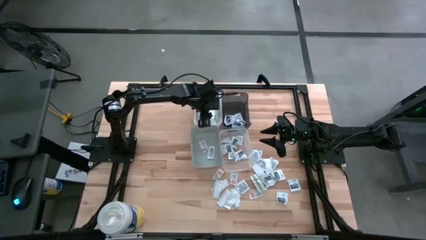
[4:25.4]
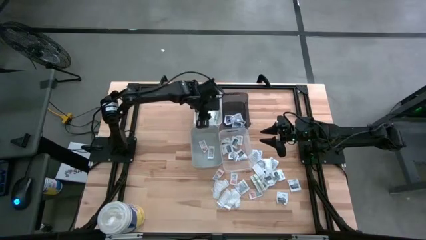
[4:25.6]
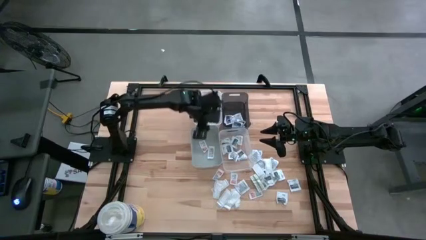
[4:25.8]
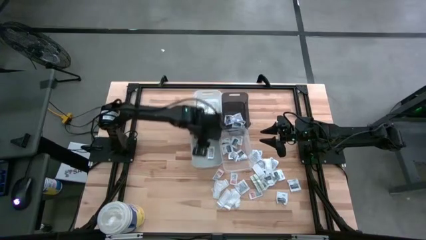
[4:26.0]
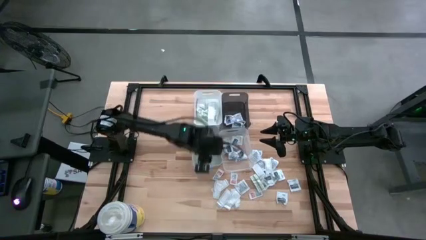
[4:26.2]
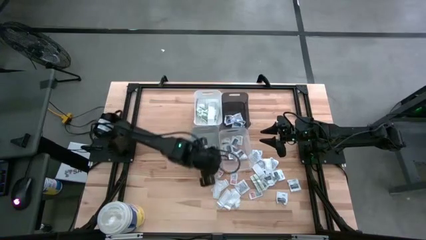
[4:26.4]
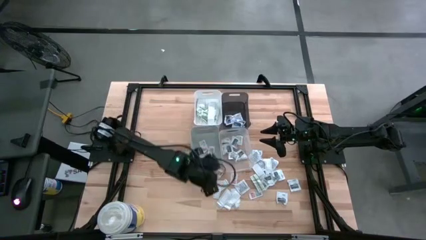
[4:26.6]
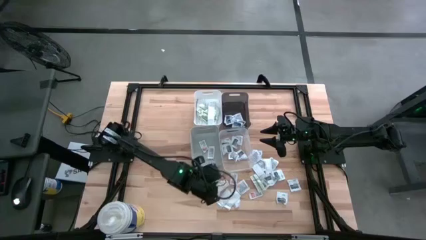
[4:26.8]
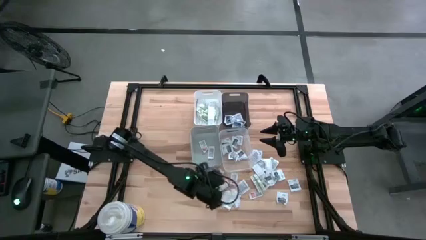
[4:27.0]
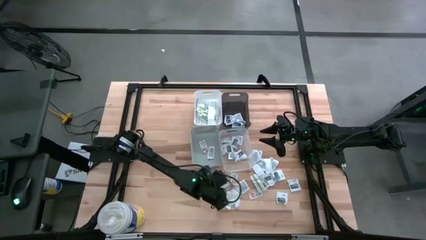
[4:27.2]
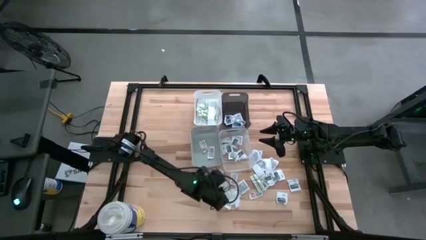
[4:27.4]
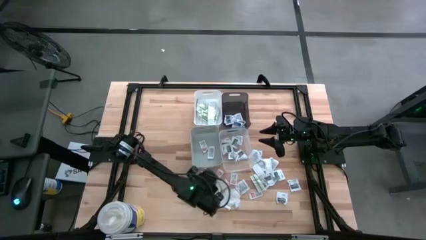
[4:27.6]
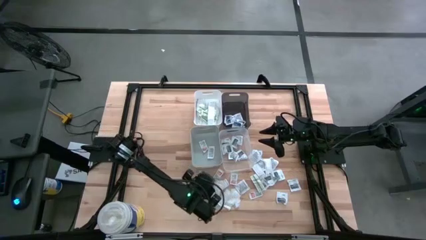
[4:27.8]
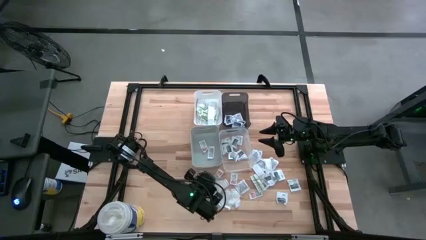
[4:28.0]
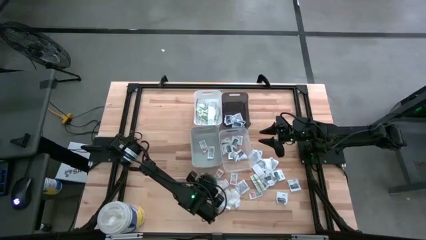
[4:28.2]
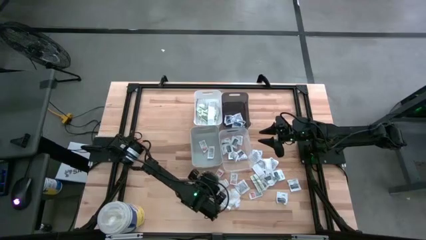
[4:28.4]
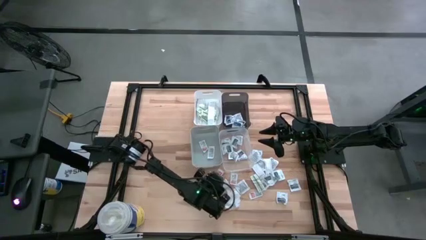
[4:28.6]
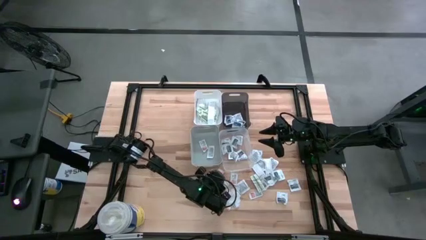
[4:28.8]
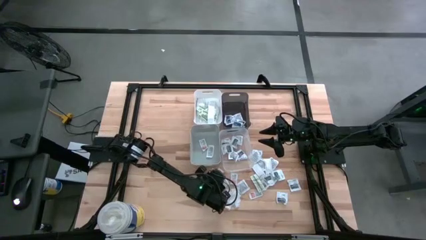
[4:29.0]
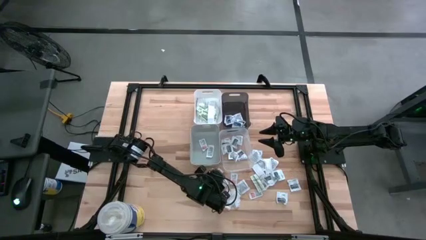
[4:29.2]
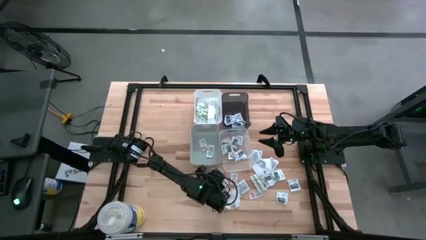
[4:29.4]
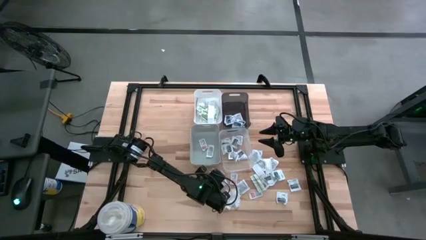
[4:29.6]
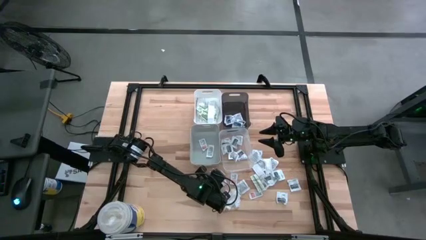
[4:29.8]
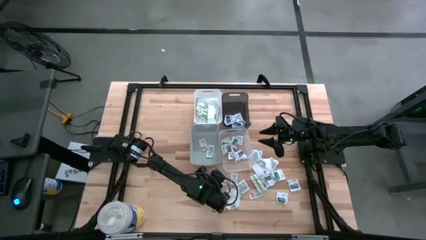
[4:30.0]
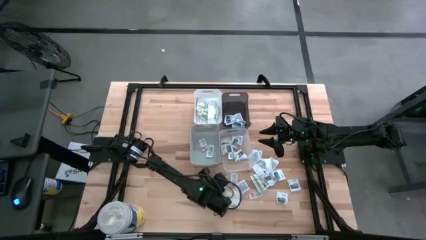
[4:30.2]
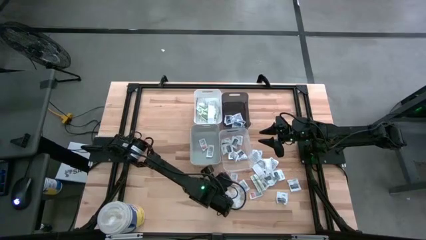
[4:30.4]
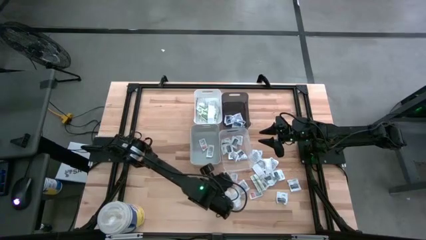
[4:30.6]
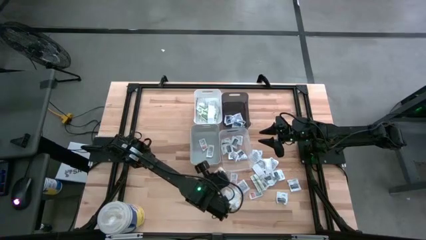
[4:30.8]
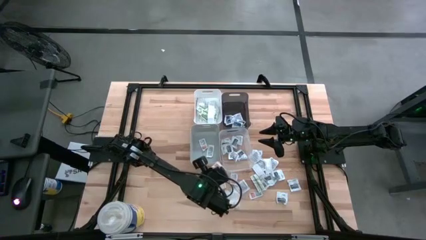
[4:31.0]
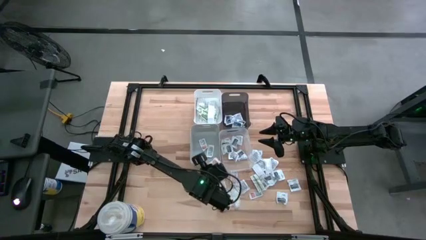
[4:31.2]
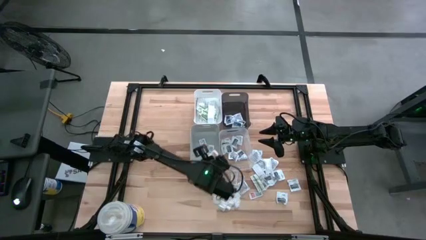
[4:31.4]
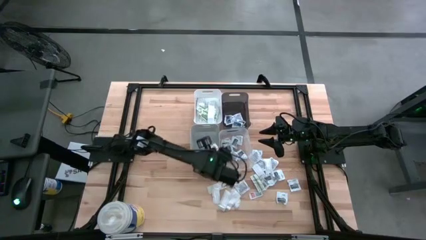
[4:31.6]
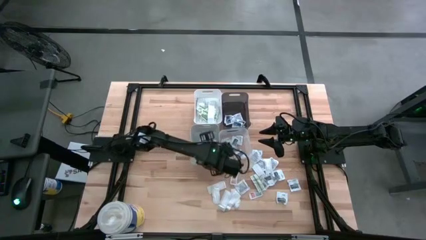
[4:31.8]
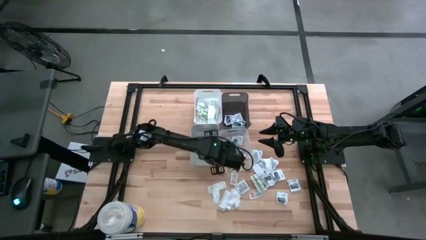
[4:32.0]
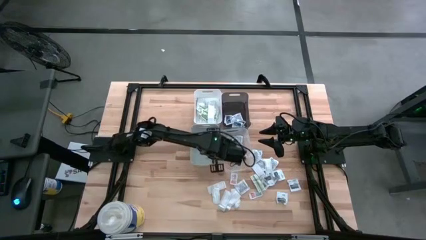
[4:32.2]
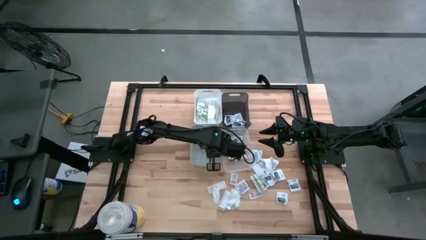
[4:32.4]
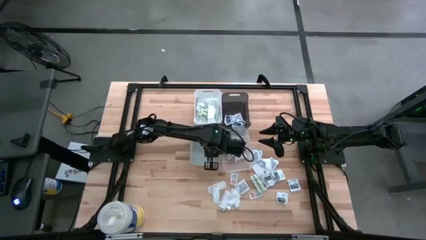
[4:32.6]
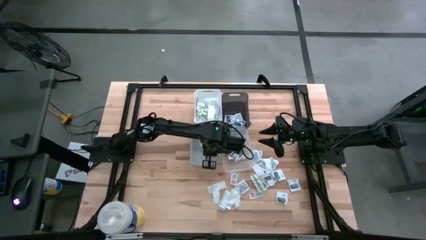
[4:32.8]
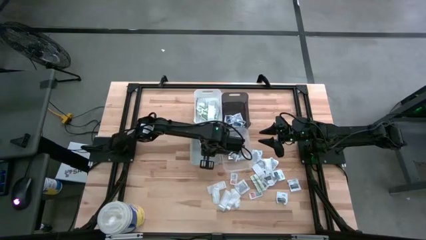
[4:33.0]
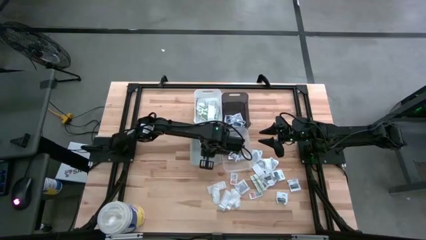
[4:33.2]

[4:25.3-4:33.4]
Task: Pick & Place First Aid Supplies
Put the orange ointment pack into the gray bin

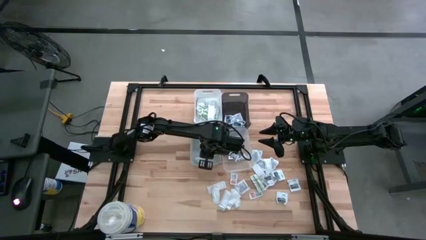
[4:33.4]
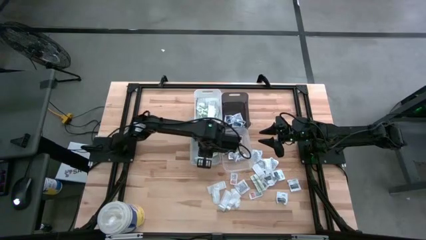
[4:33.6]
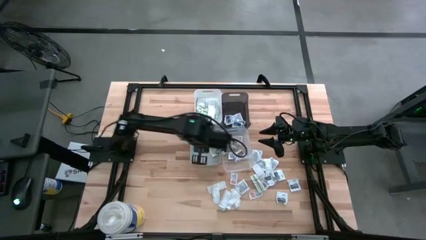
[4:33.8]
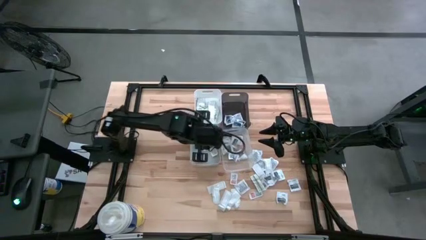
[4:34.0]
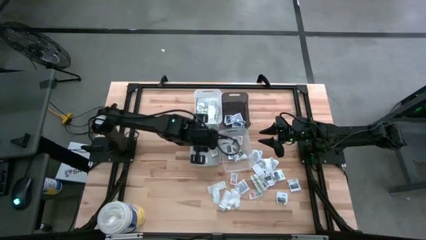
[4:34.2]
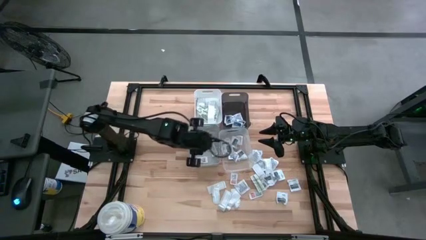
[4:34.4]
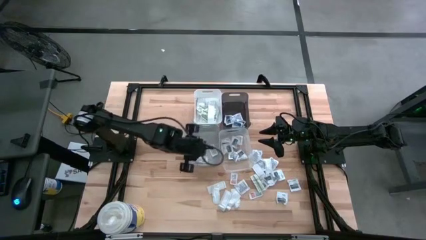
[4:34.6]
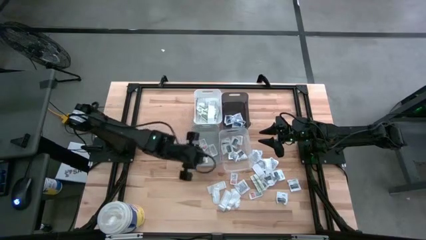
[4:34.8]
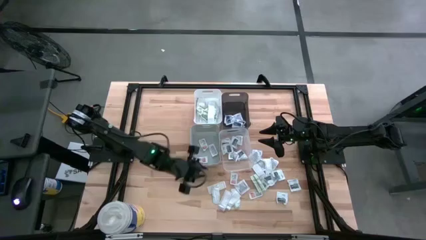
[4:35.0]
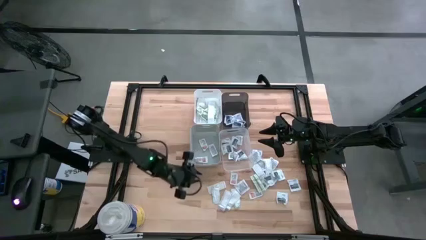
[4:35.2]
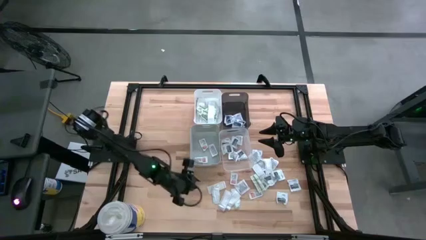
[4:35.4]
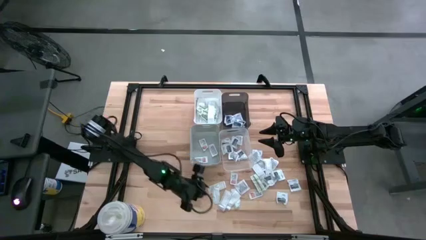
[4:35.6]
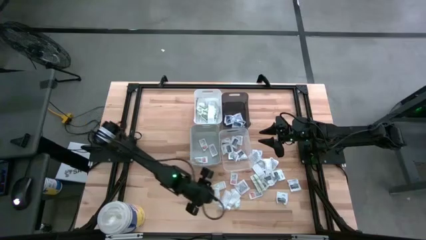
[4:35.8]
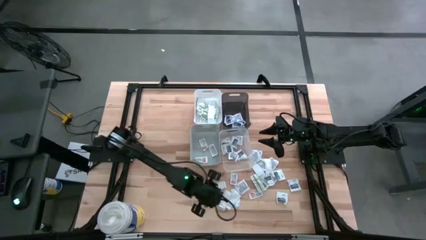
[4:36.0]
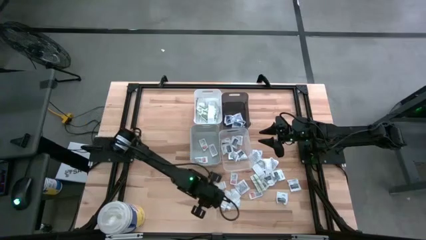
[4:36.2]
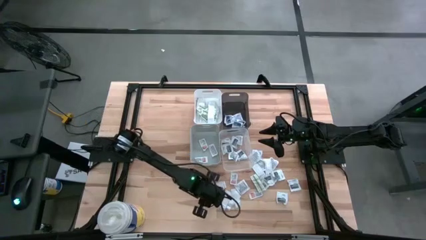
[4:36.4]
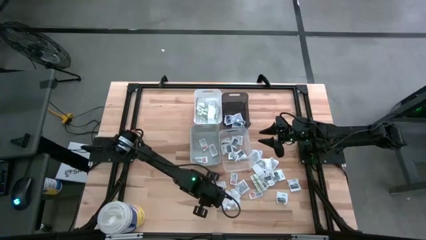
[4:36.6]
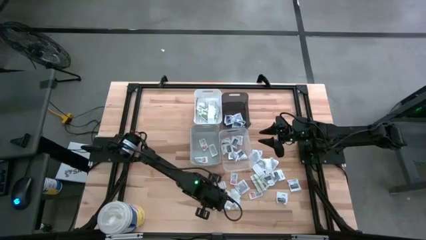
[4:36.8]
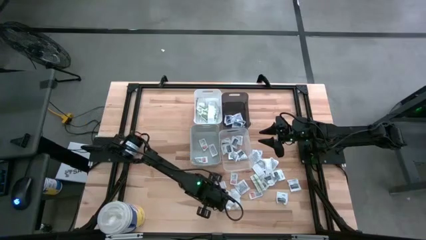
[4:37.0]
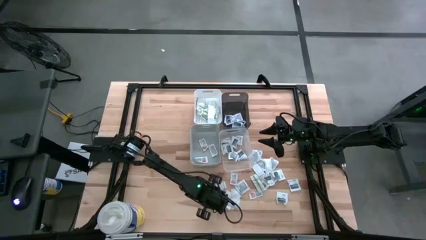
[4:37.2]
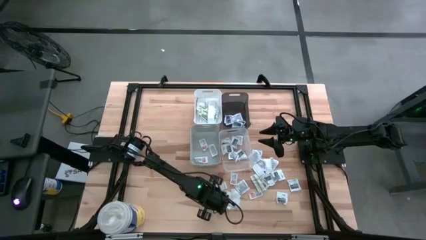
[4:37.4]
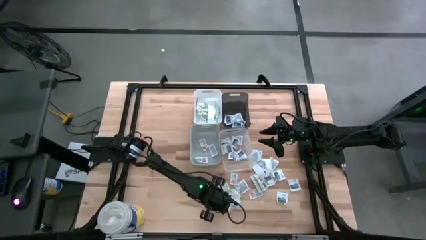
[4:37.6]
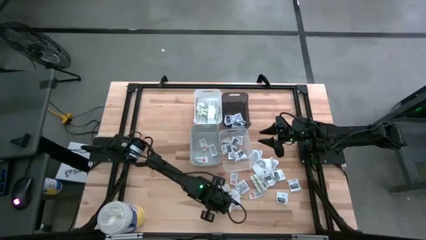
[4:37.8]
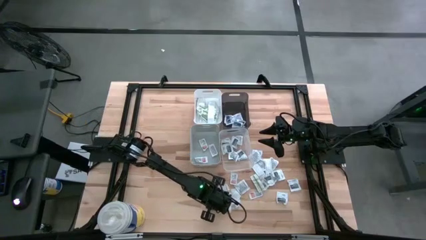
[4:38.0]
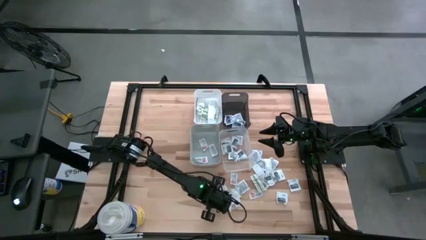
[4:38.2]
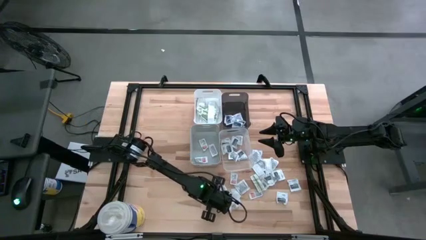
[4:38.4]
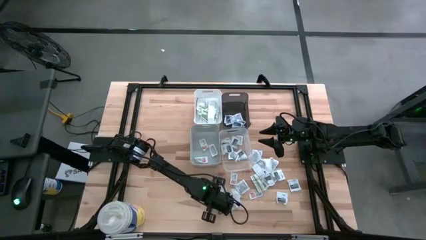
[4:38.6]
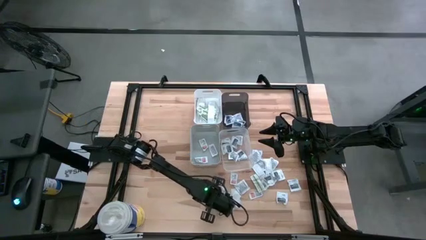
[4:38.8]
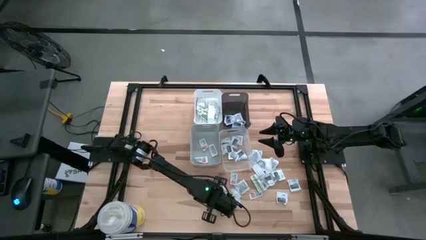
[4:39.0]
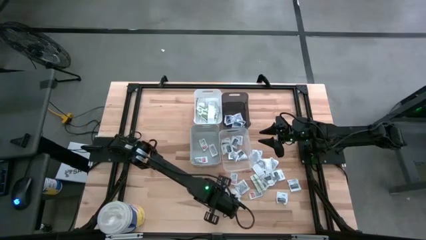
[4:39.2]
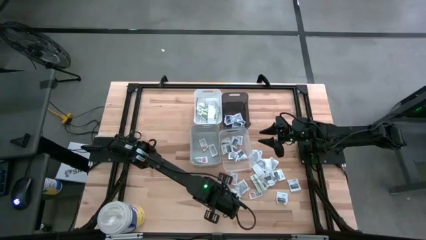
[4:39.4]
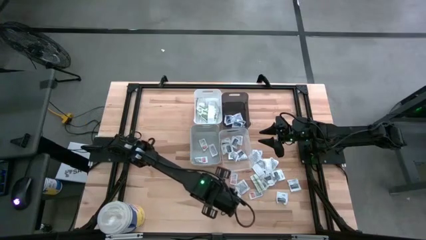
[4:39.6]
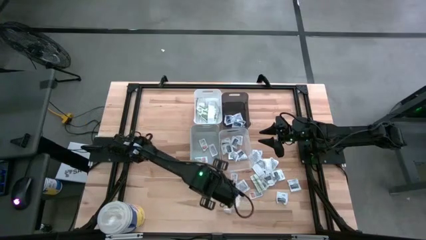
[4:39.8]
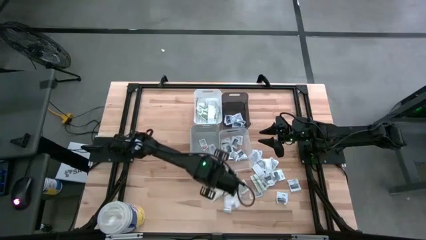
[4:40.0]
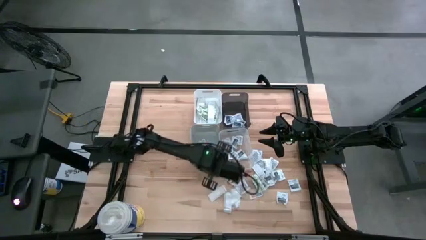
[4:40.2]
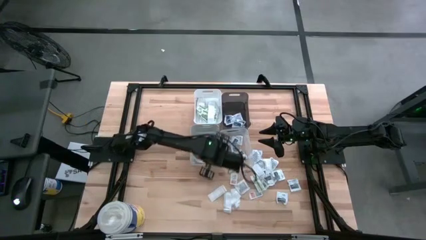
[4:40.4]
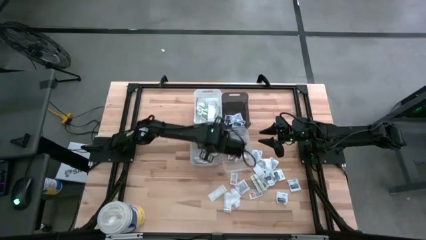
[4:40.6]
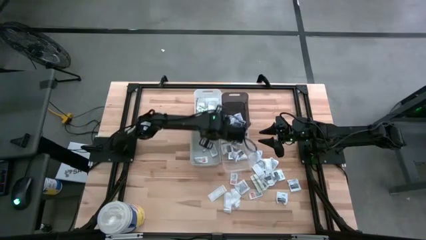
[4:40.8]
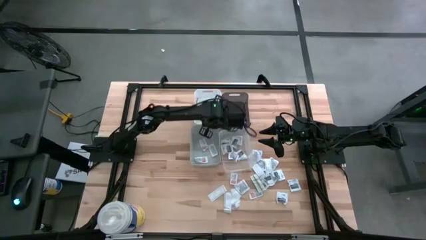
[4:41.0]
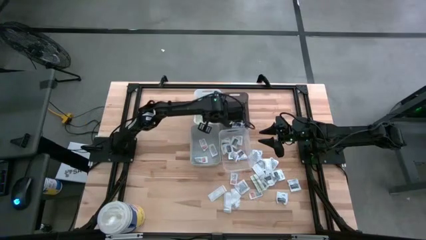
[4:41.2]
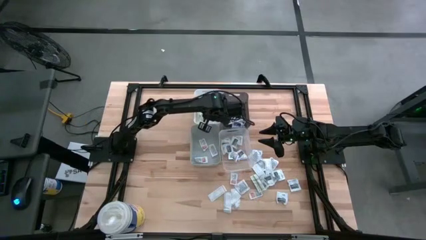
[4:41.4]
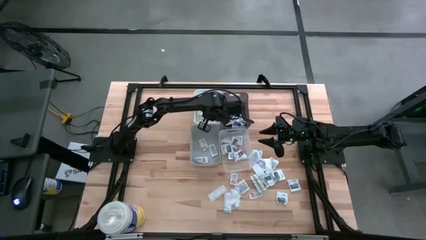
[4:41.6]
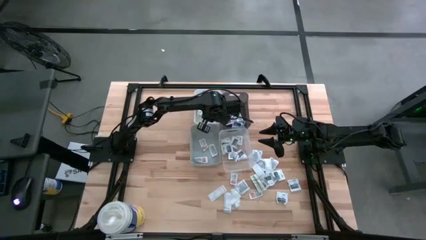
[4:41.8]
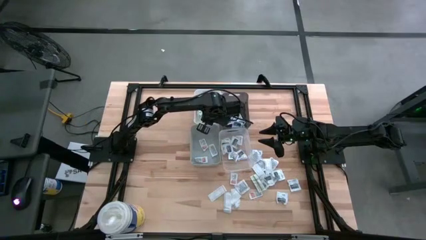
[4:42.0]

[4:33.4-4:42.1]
Put the green bandage pack into the white bin
